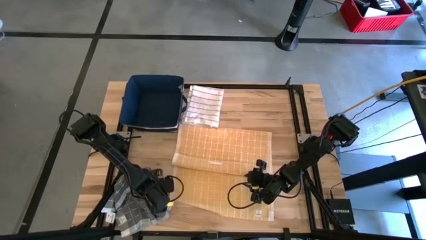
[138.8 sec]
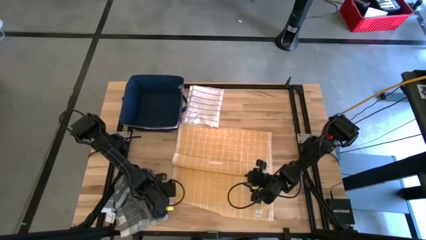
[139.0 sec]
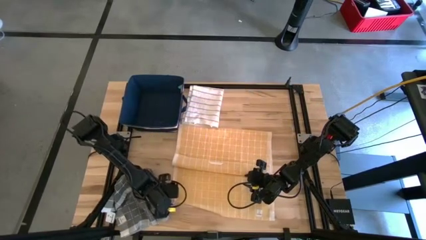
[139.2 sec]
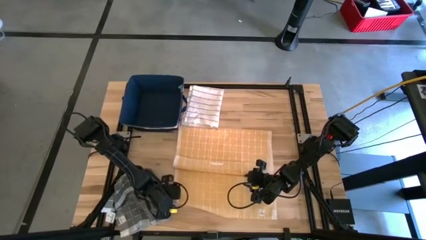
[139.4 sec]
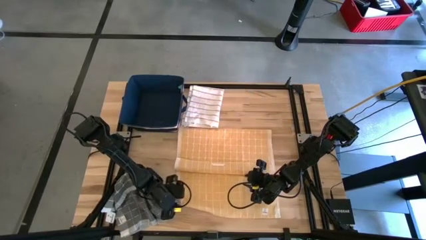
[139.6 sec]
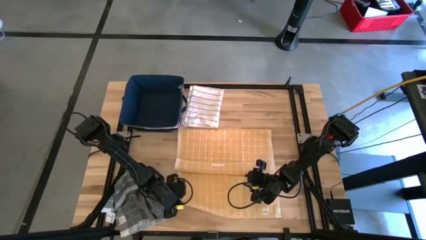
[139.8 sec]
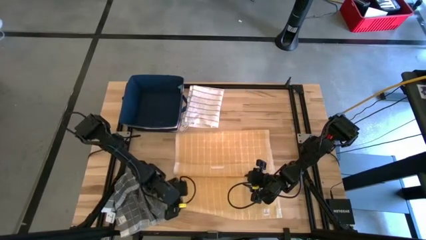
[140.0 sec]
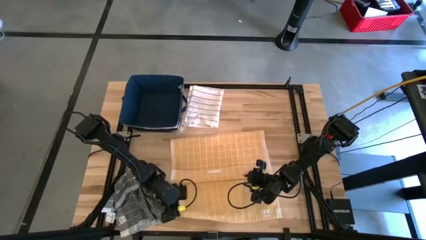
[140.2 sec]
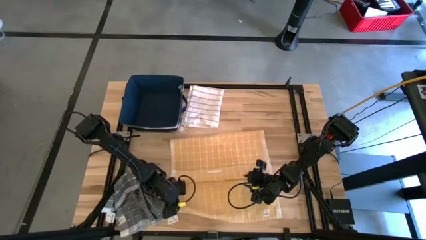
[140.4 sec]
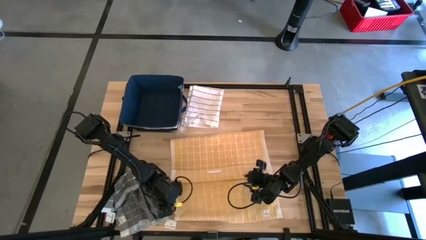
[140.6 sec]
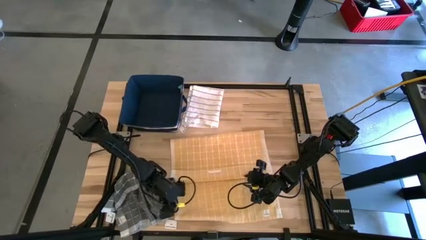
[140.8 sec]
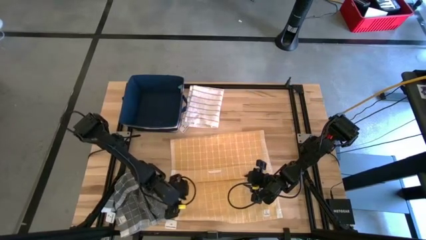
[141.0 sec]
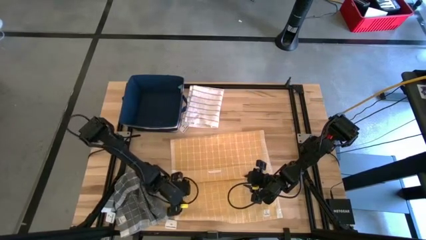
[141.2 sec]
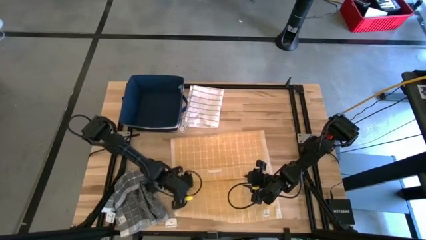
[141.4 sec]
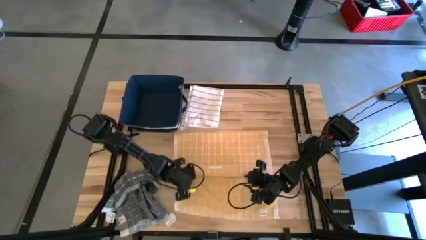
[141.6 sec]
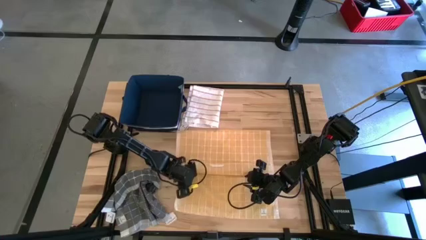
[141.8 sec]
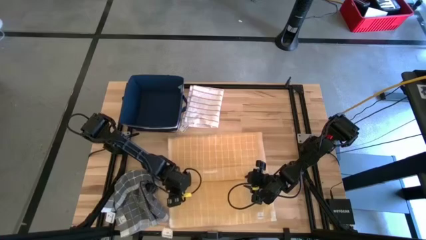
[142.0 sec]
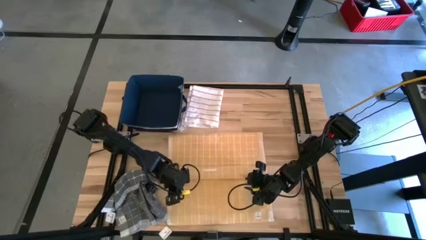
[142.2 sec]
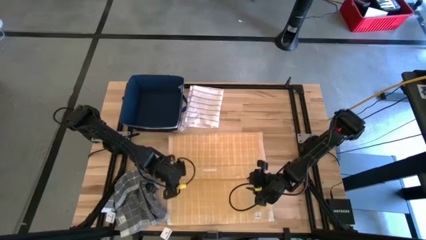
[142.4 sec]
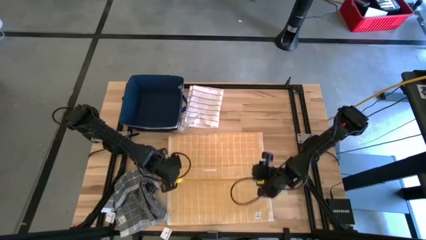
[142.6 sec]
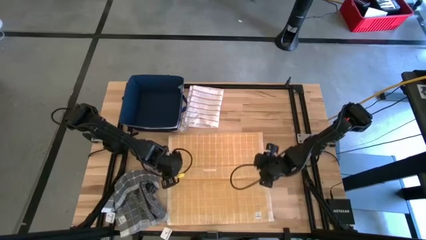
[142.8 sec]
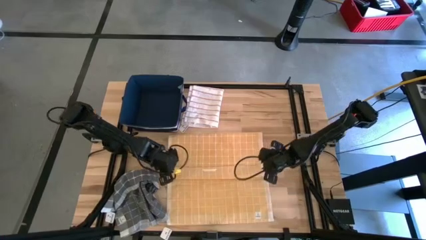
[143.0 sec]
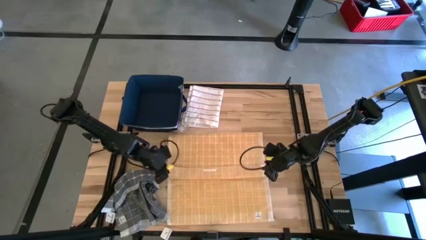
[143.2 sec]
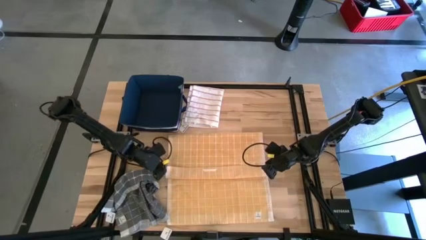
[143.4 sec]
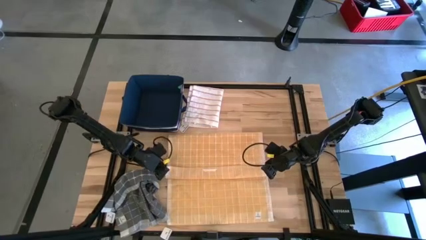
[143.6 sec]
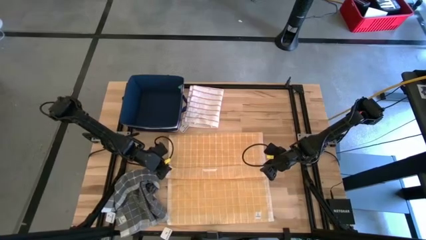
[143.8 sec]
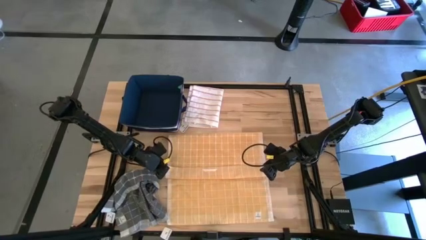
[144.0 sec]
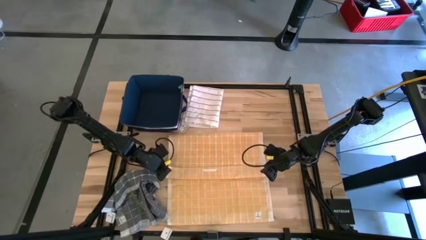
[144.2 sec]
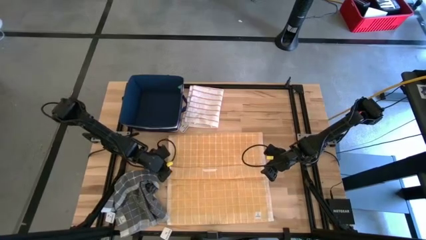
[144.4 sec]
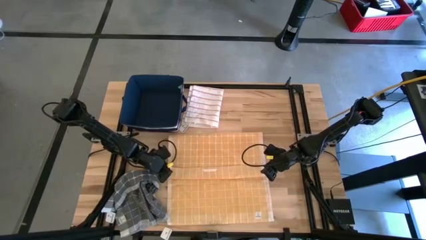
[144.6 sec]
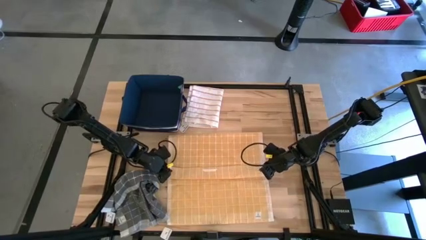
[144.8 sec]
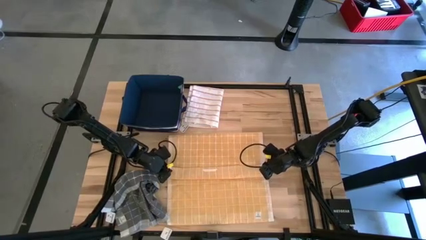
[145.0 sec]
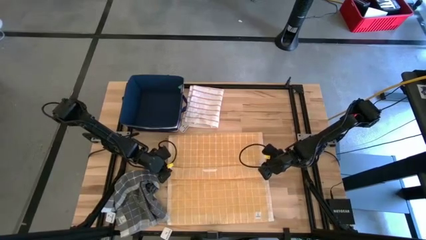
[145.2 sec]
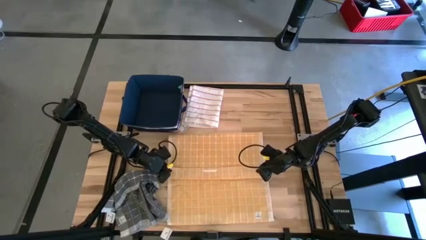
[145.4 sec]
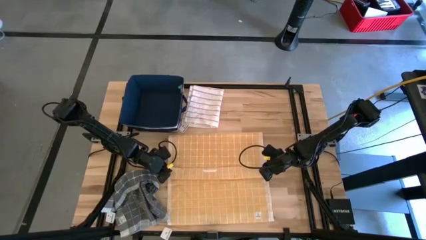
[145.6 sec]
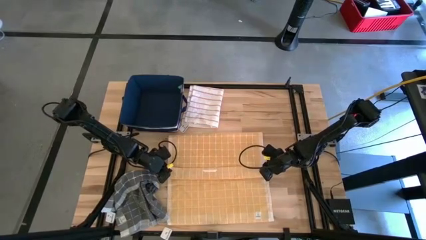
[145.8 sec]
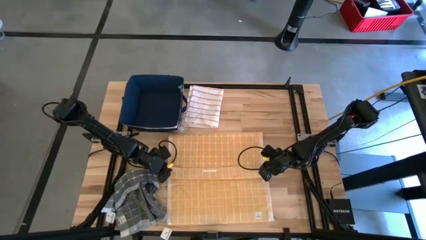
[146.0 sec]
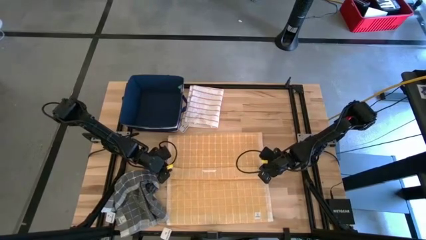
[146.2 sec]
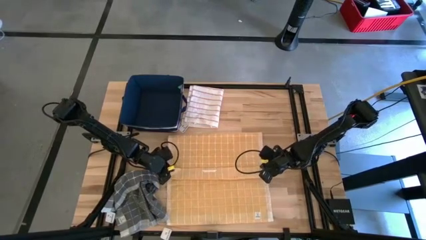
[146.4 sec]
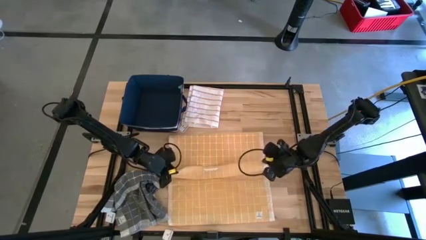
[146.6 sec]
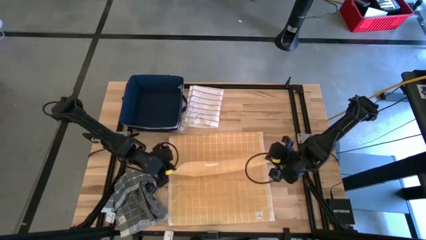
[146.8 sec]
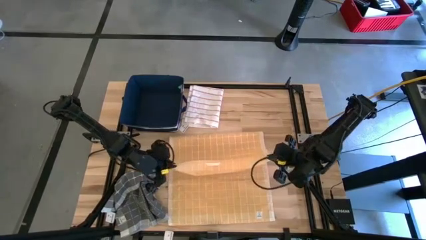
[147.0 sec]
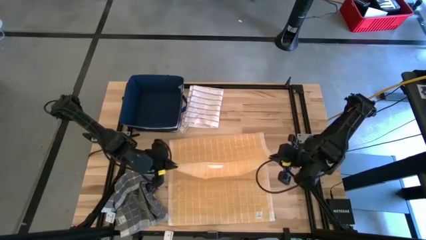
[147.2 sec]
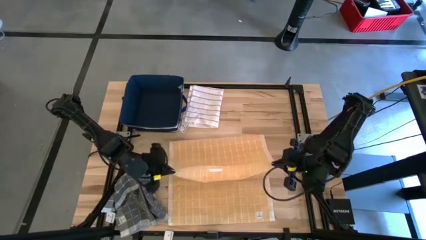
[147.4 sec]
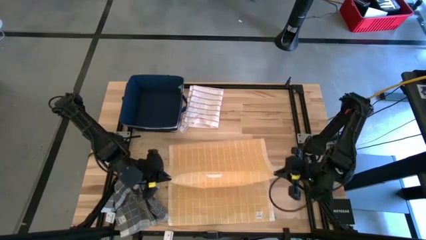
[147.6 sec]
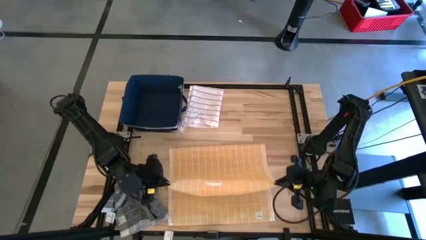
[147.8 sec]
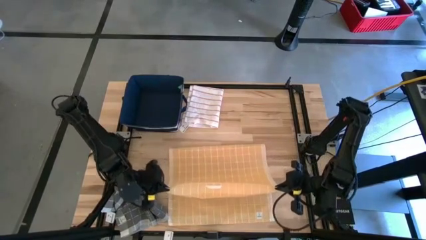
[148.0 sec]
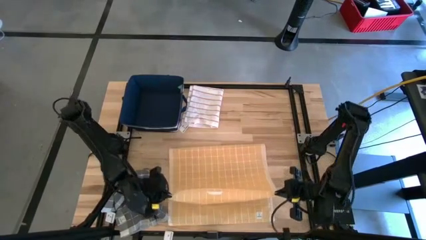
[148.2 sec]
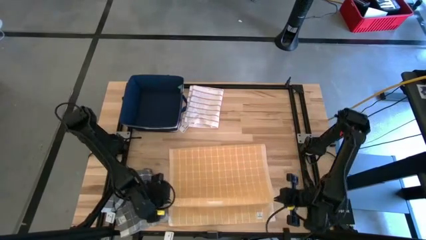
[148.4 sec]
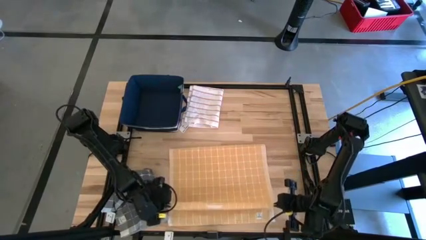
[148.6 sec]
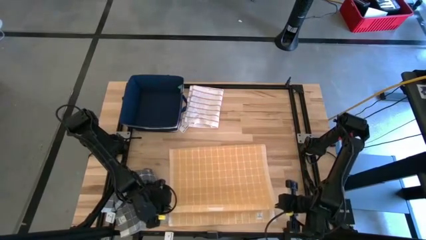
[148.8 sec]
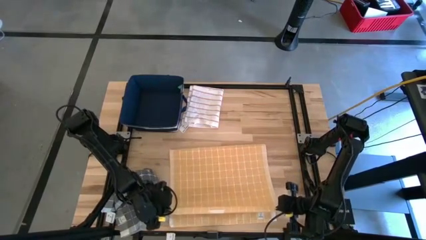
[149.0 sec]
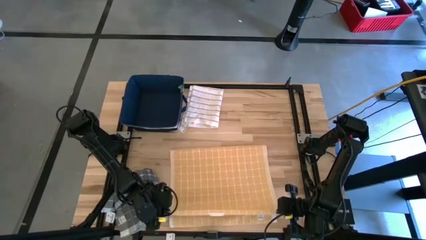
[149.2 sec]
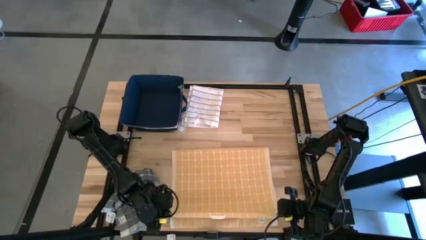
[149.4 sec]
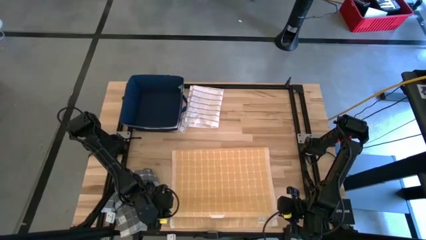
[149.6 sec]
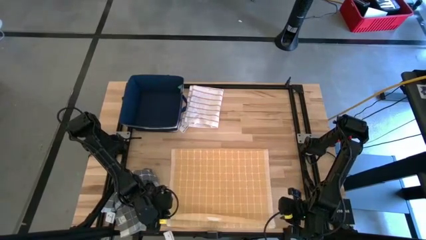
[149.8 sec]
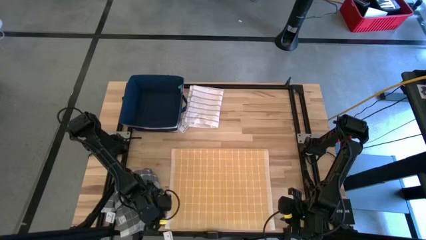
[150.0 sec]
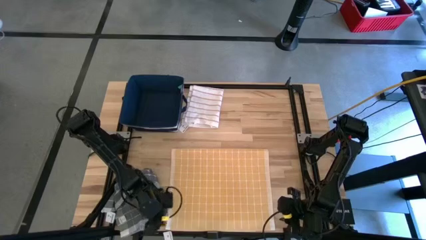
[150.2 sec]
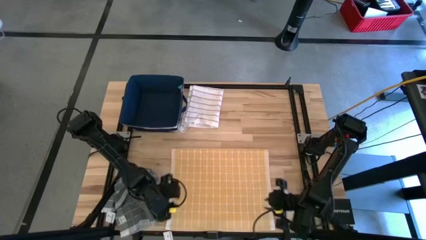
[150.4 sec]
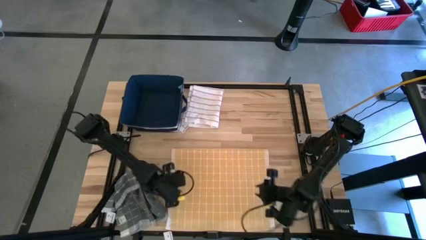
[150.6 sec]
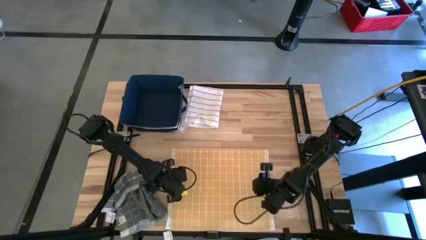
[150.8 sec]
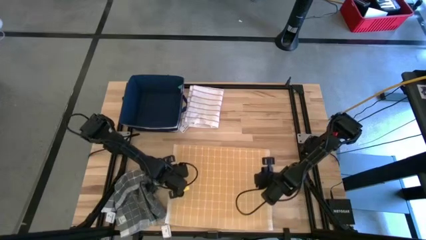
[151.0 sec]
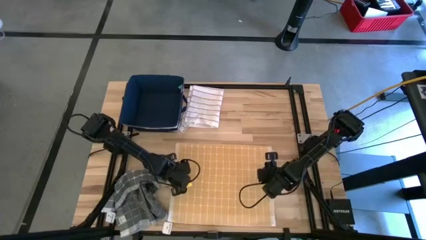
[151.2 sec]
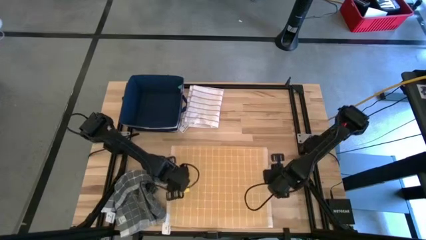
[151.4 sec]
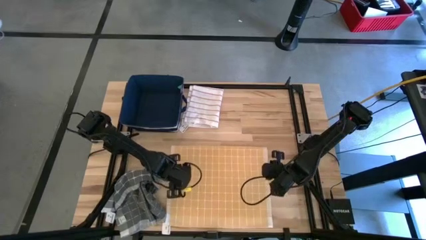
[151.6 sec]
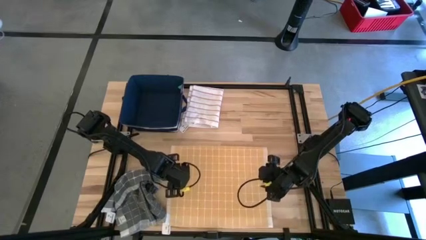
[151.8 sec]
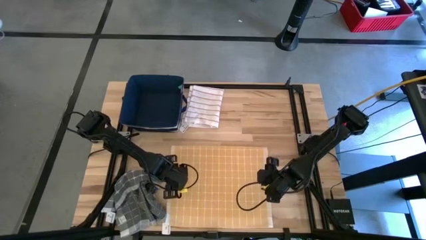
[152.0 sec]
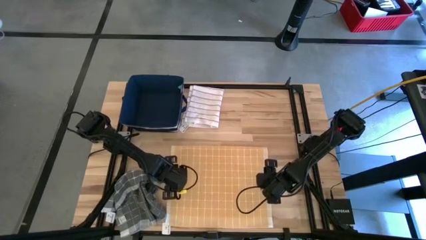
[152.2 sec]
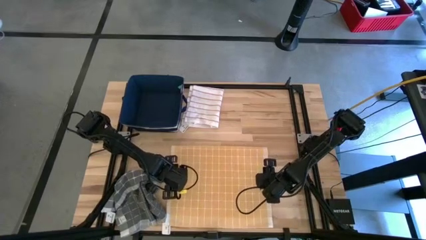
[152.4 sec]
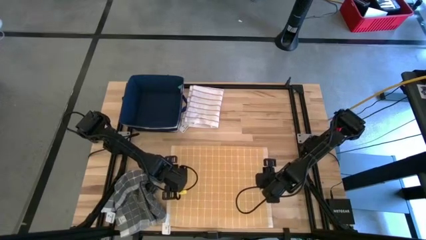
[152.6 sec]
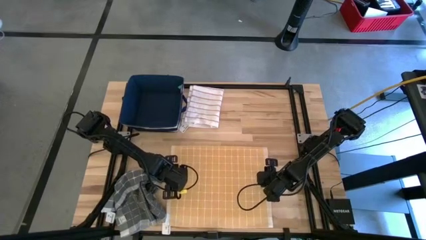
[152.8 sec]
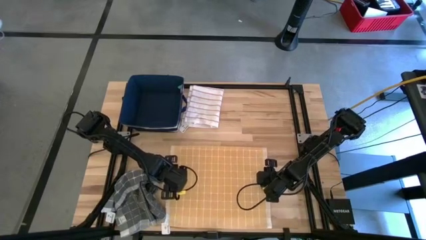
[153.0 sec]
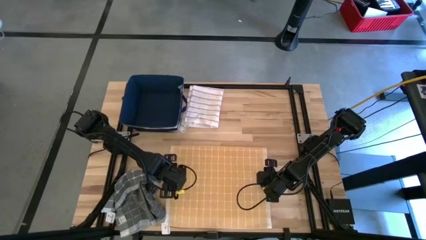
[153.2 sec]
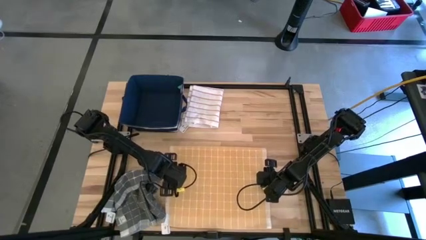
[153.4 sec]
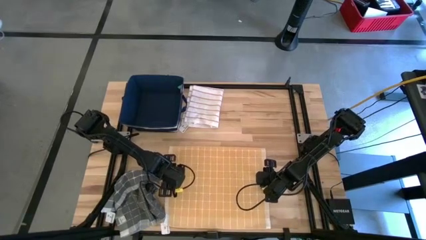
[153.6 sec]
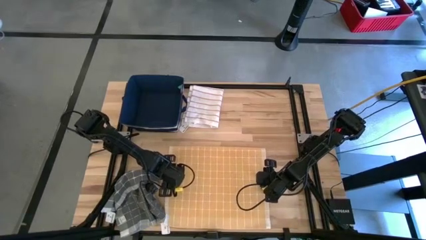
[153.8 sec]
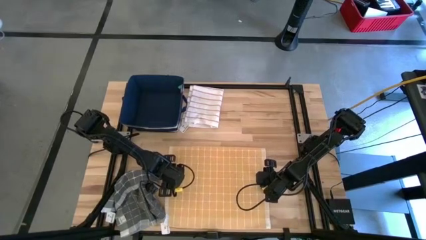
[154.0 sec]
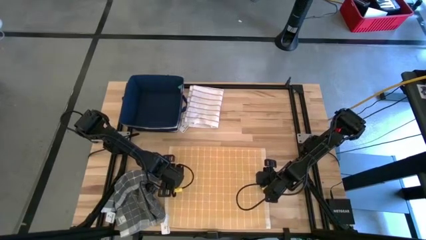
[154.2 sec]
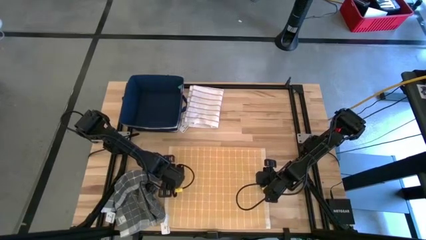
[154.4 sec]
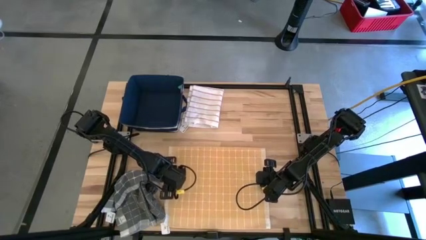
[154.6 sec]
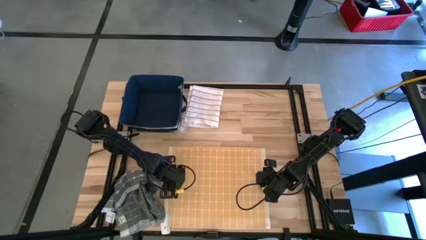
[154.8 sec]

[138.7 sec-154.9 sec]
Task: Fold towel
Fold the orange towel
